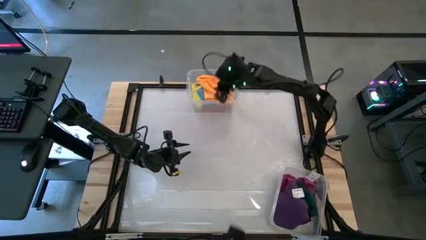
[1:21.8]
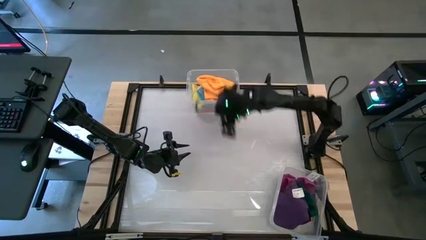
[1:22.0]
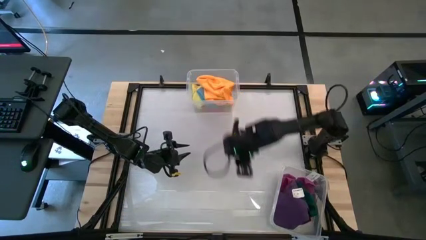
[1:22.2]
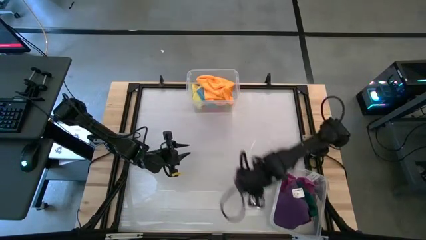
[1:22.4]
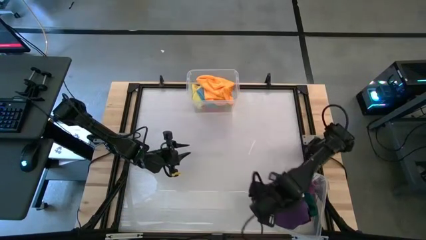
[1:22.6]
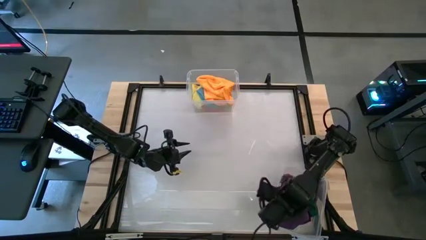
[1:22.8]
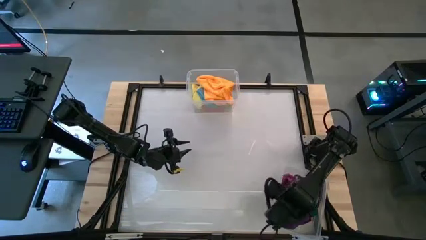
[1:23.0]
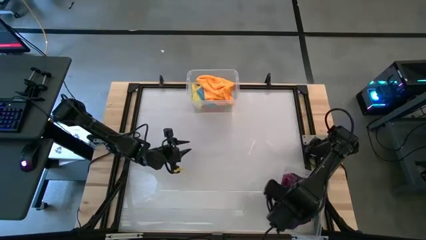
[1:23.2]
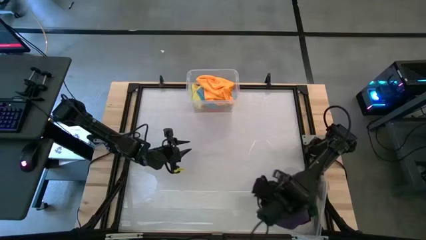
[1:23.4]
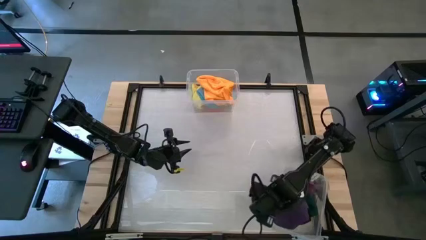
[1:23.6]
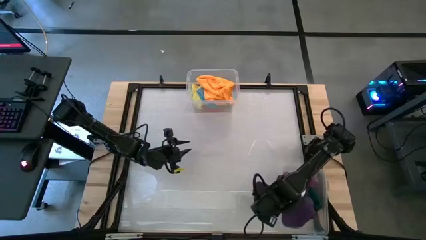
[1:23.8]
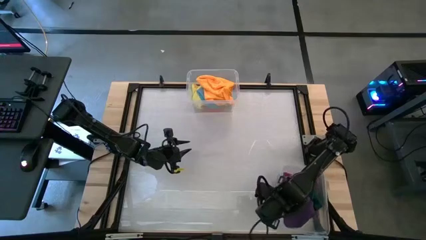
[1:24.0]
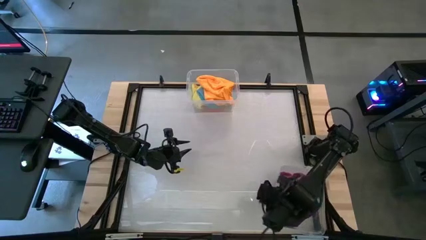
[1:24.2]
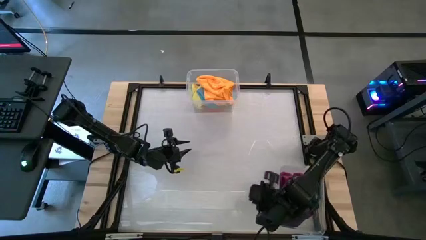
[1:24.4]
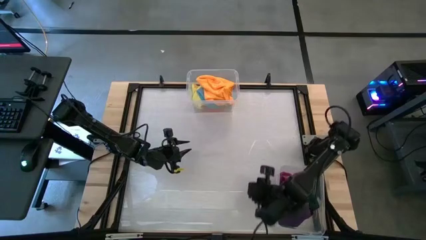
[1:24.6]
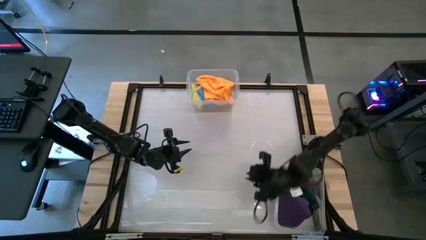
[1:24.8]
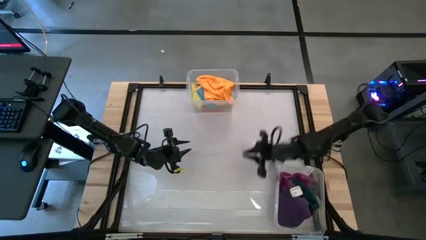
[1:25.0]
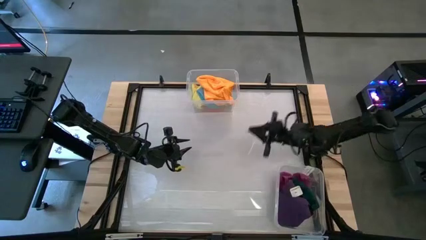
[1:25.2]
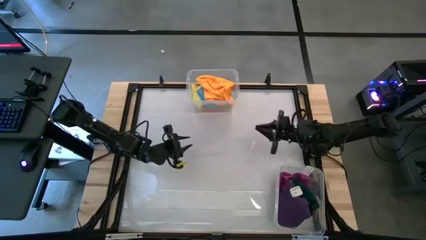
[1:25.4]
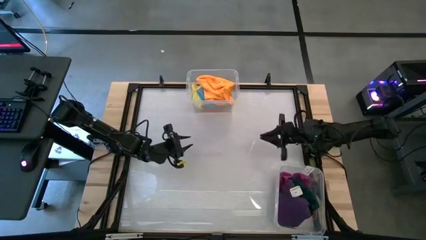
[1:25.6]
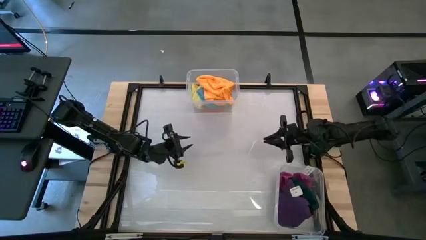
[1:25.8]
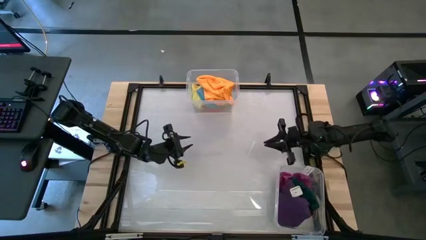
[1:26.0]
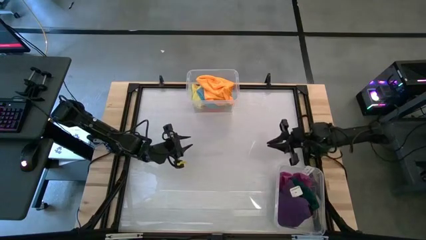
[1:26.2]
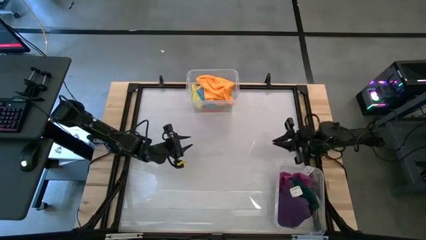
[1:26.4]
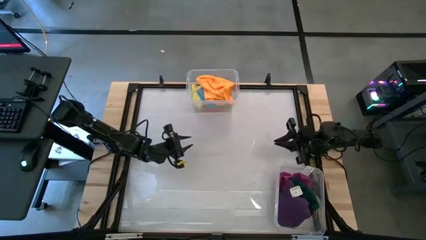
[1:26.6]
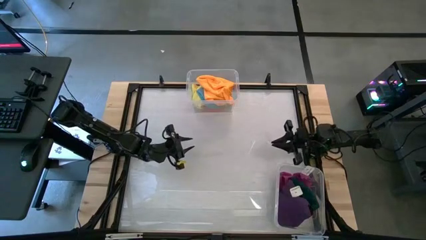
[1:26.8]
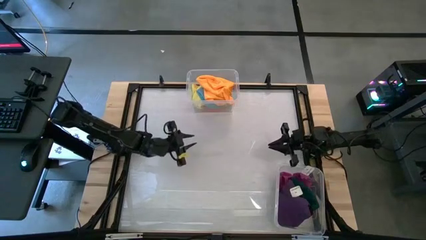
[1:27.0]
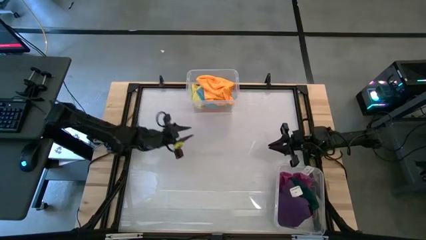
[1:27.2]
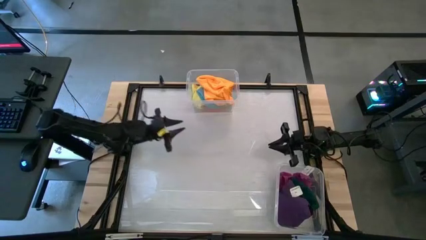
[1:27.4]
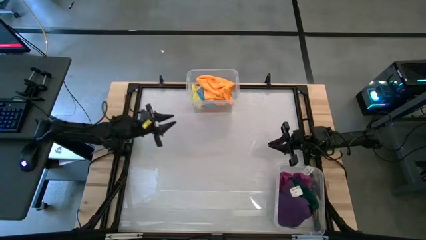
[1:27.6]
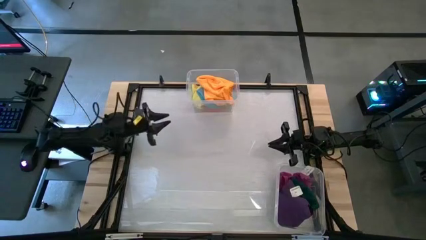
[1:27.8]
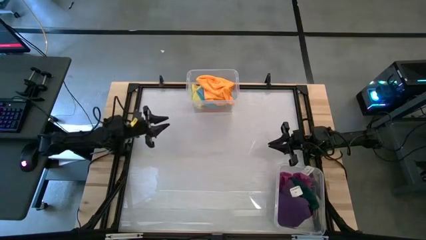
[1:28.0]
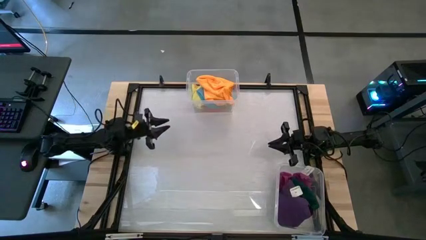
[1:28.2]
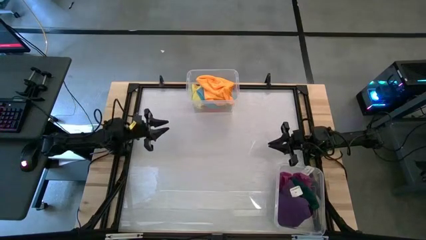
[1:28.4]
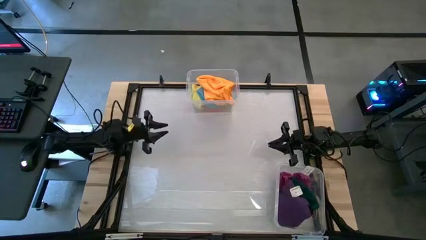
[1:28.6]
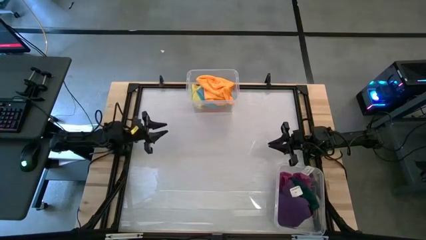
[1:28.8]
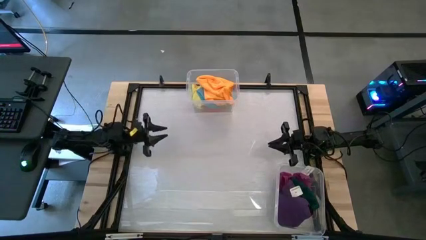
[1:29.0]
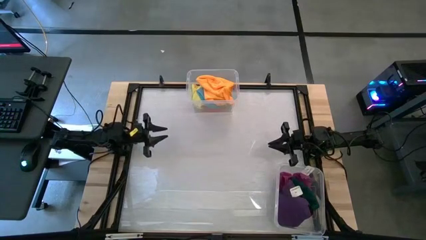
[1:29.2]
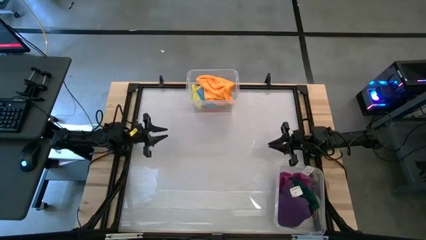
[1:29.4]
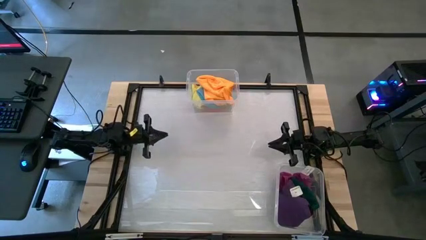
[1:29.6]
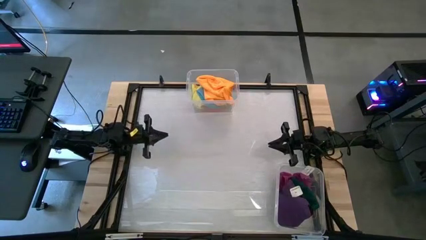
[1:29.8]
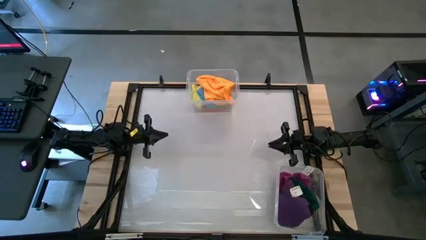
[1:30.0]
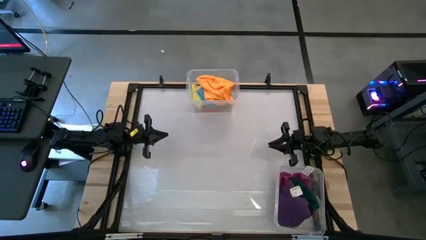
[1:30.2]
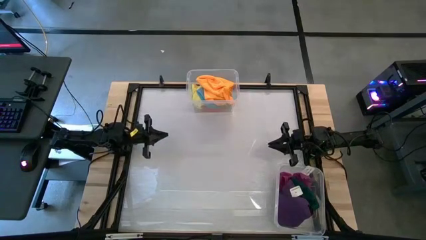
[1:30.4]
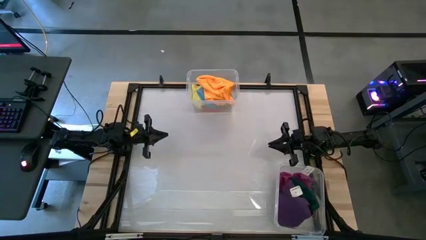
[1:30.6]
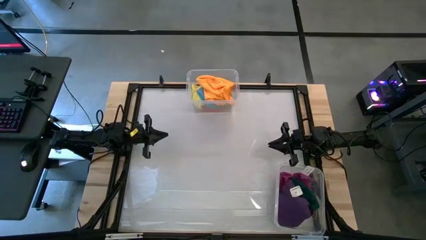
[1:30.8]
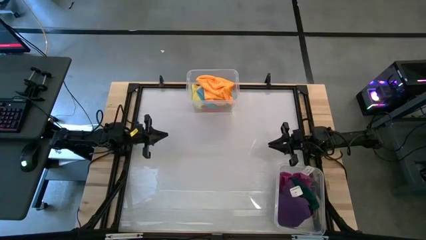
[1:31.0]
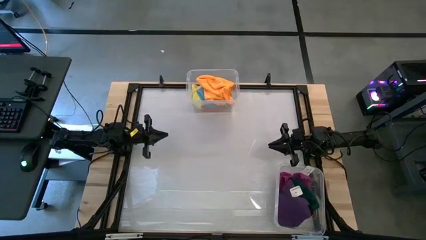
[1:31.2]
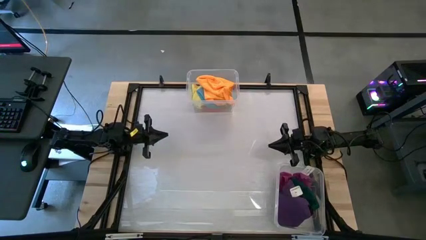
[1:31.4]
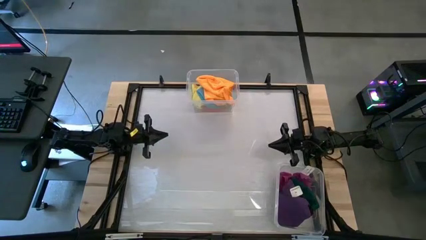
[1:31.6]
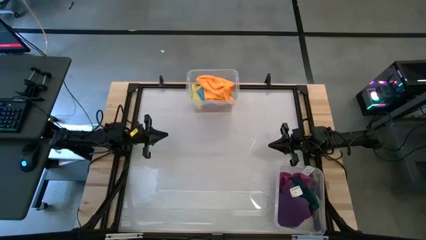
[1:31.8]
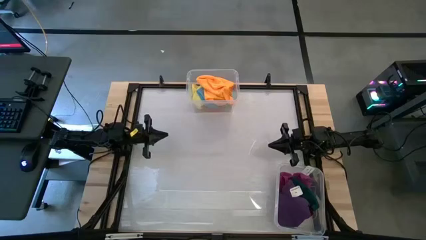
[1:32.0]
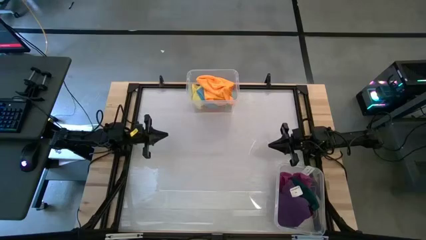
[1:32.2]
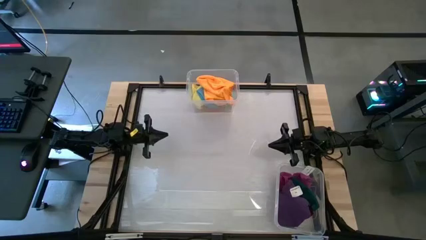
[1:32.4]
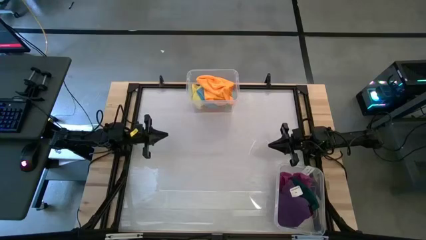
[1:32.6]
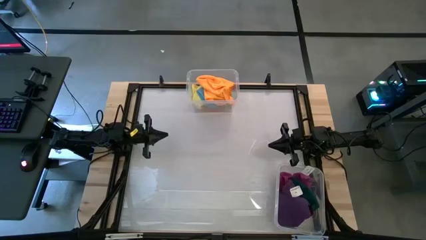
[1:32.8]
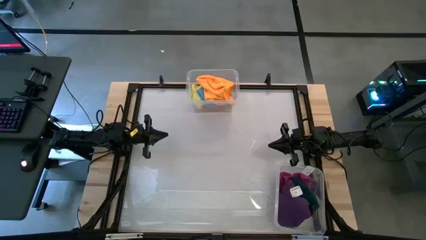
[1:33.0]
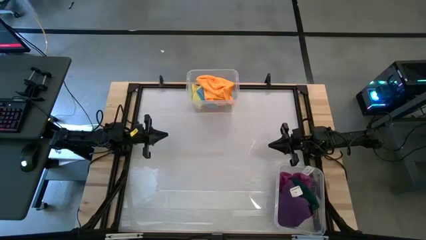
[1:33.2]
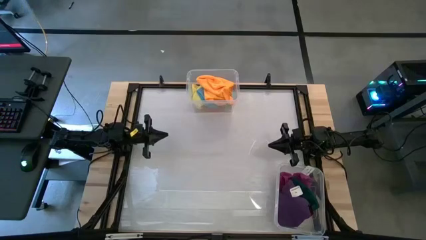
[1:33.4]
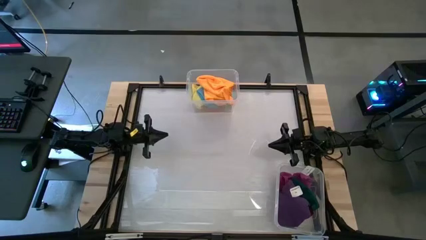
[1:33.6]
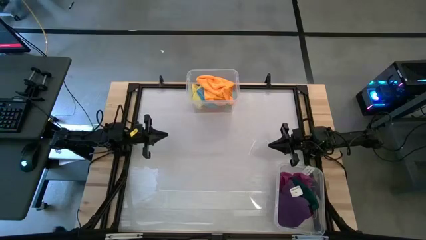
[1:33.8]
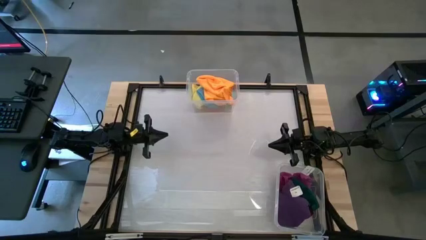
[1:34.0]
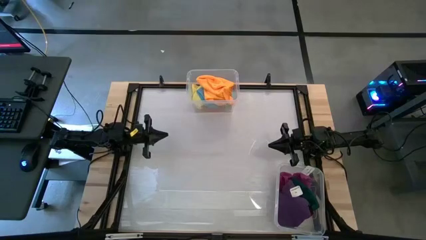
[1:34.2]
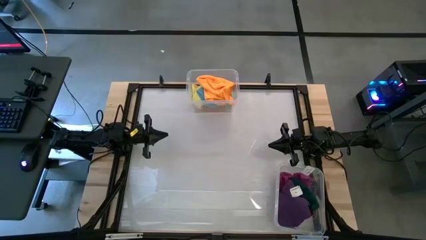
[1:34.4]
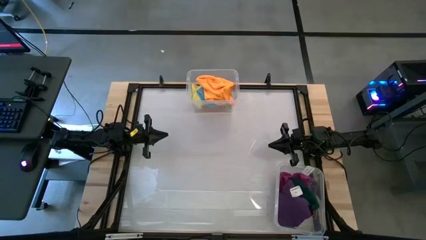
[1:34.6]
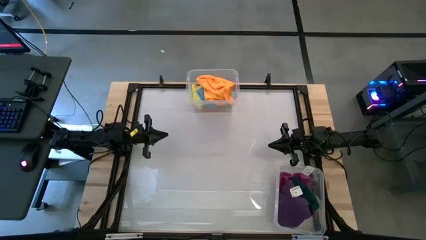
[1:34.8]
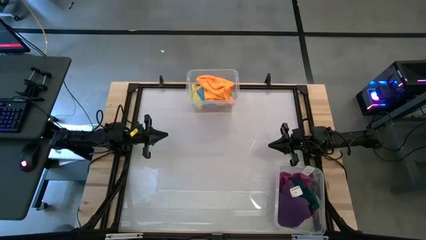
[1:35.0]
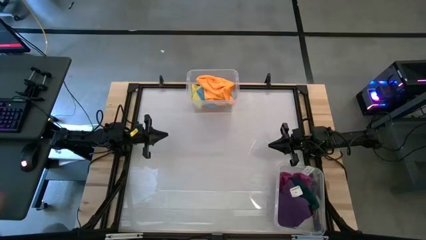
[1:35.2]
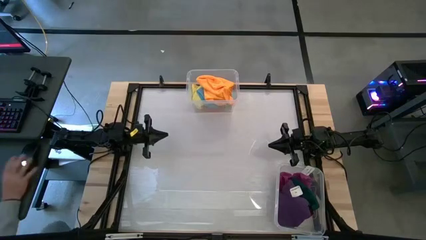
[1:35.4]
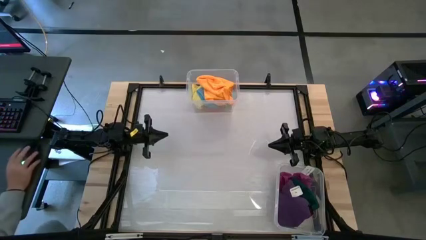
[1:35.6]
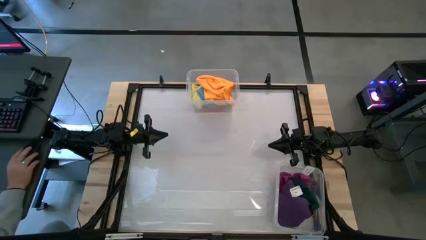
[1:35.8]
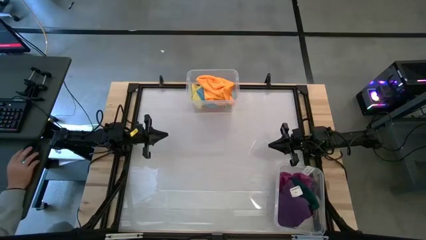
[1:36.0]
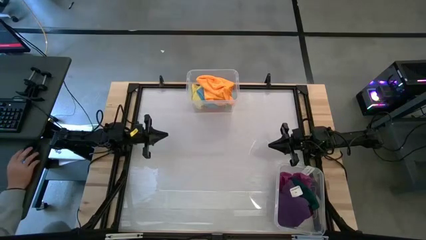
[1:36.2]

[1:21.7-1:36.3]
Task: Sort towels by color in basket
Return to Home Position
